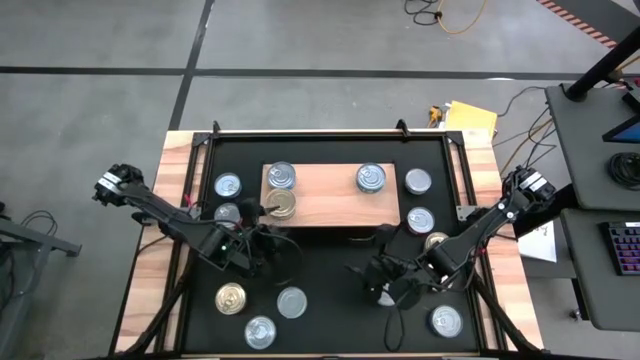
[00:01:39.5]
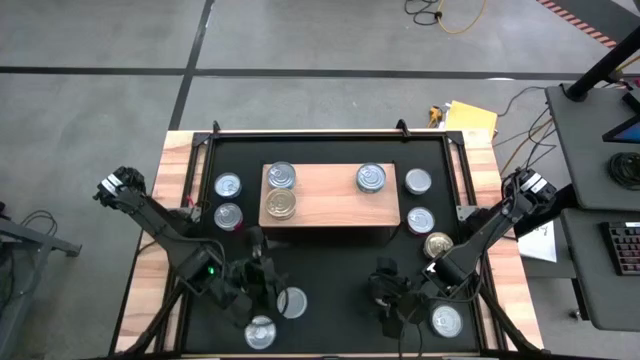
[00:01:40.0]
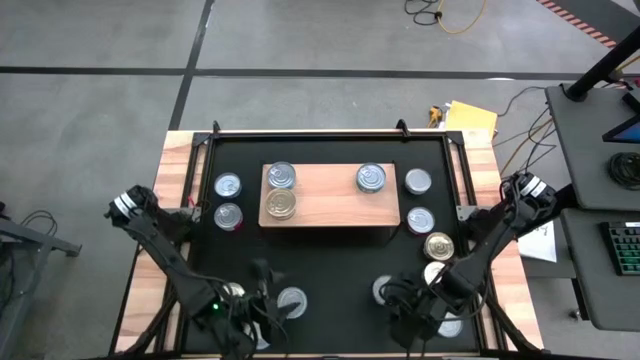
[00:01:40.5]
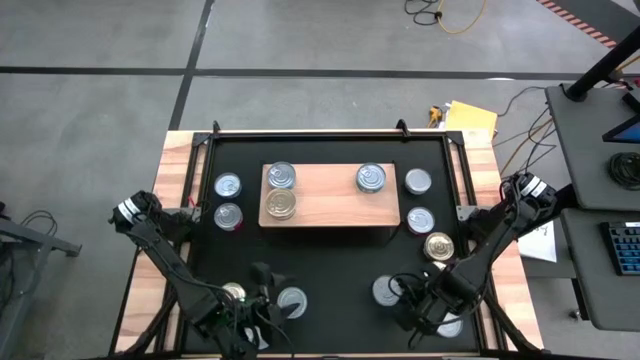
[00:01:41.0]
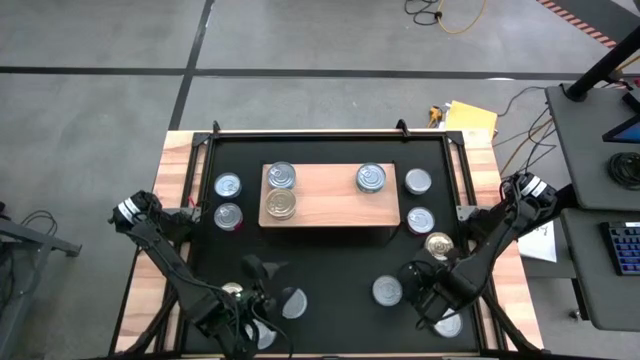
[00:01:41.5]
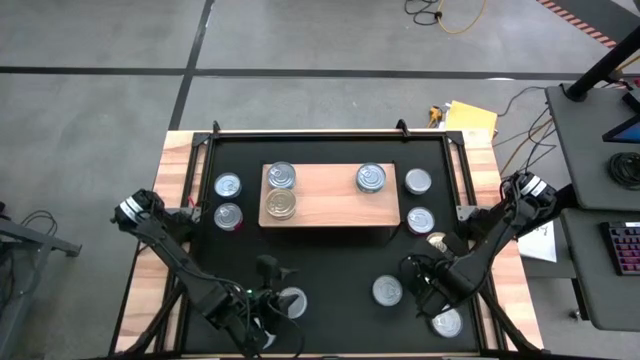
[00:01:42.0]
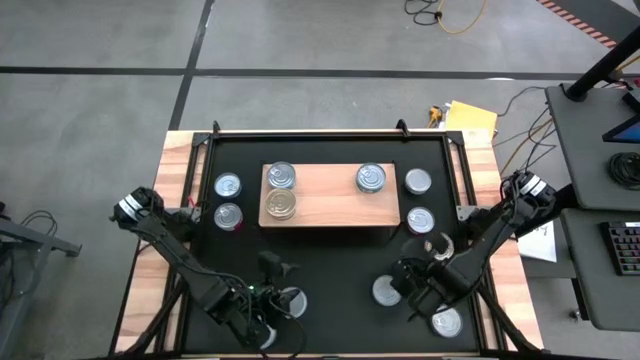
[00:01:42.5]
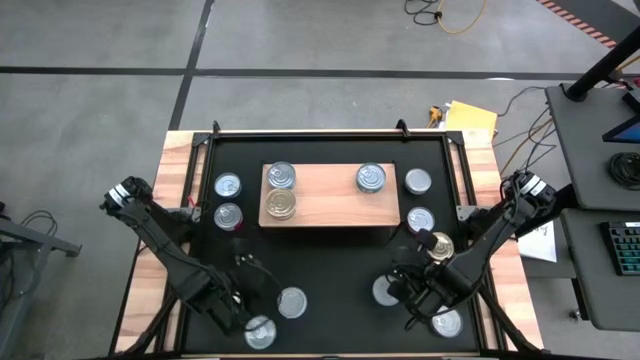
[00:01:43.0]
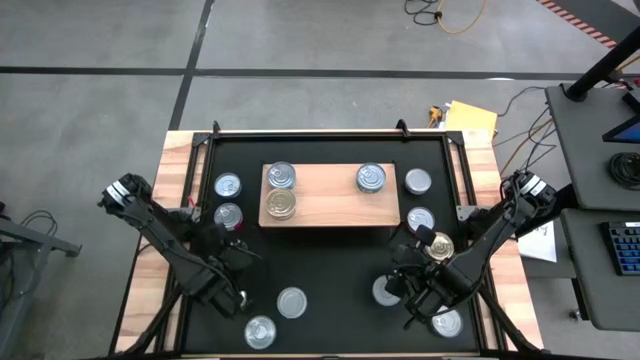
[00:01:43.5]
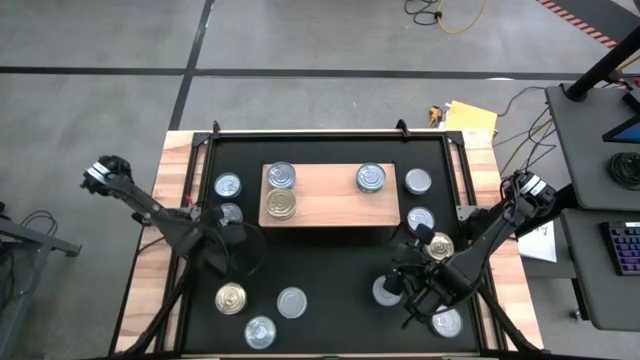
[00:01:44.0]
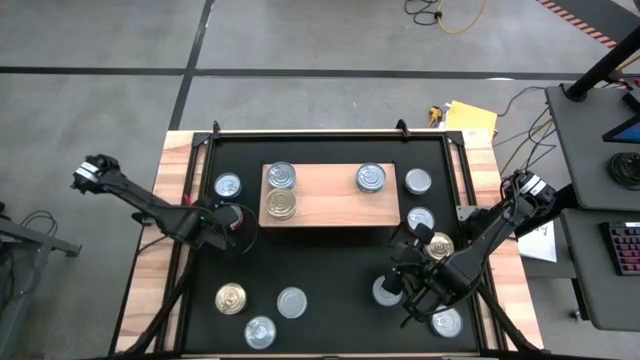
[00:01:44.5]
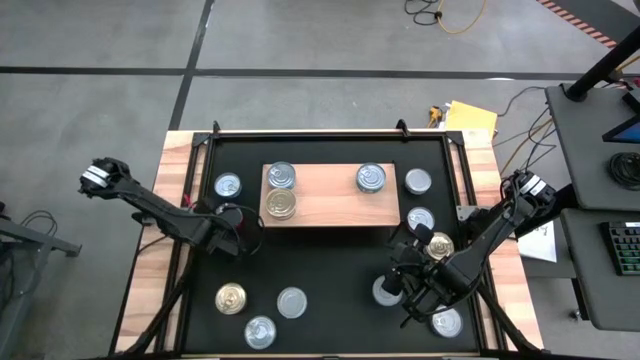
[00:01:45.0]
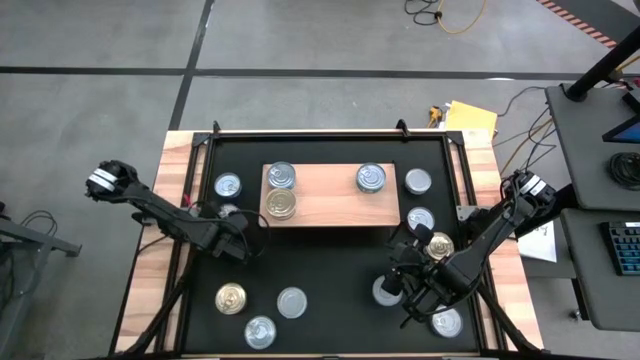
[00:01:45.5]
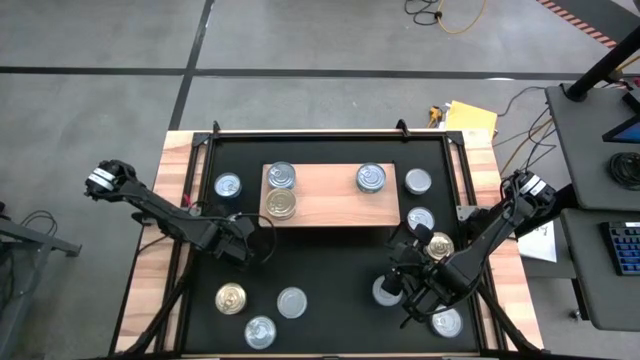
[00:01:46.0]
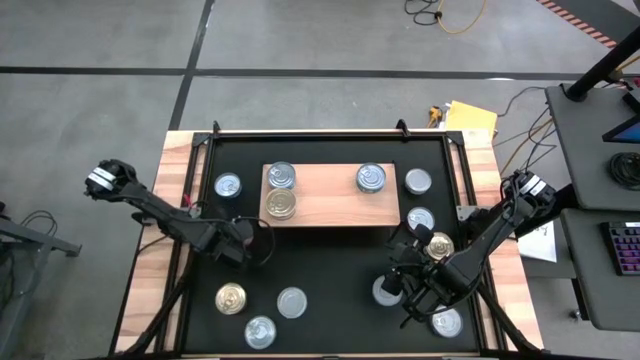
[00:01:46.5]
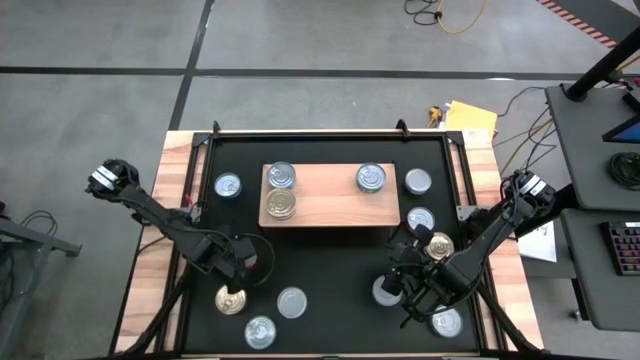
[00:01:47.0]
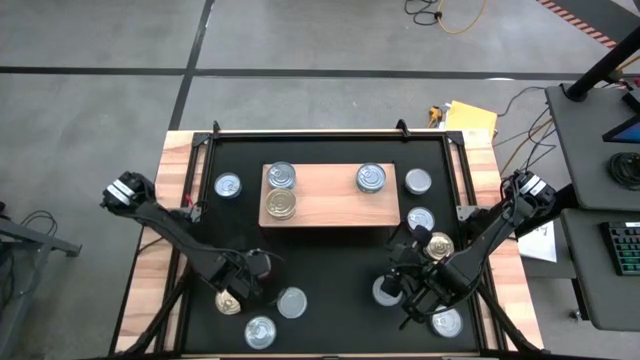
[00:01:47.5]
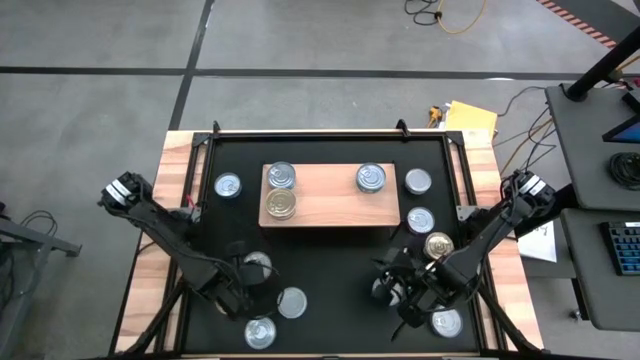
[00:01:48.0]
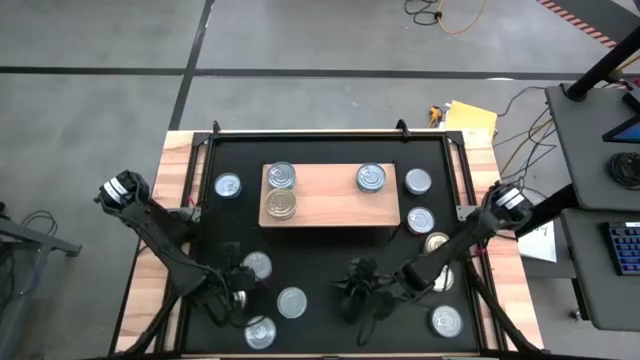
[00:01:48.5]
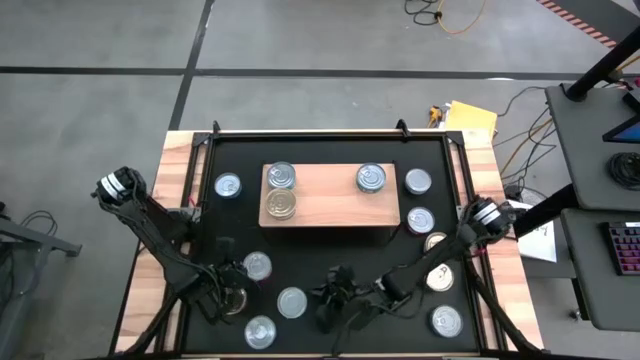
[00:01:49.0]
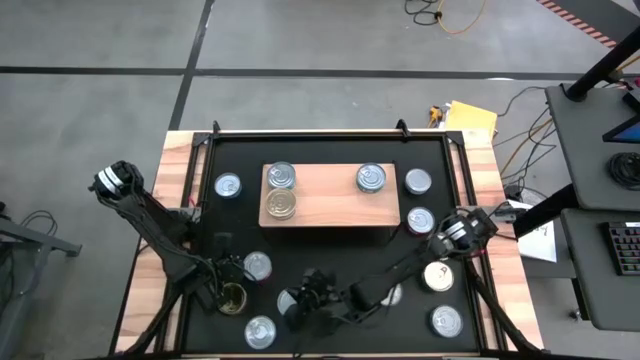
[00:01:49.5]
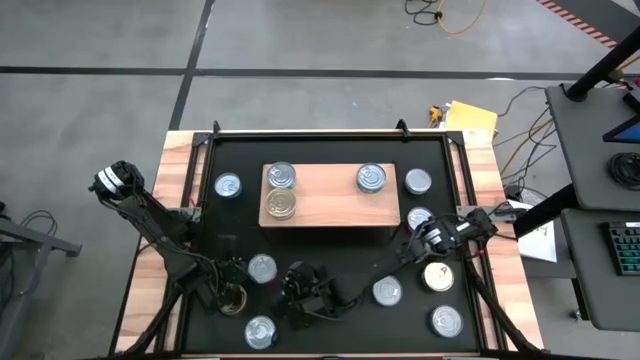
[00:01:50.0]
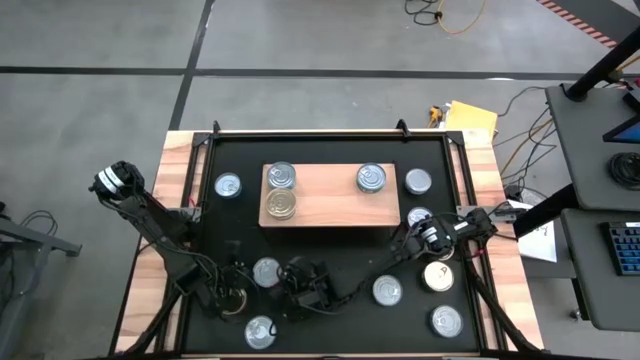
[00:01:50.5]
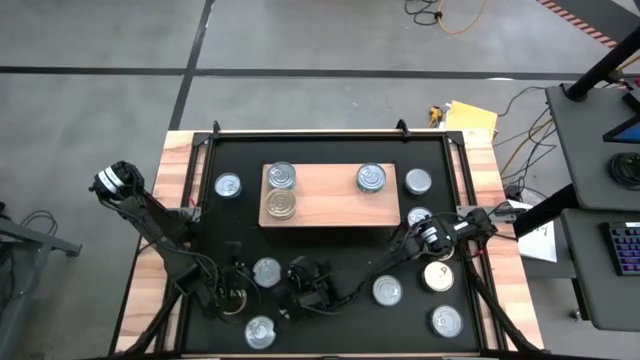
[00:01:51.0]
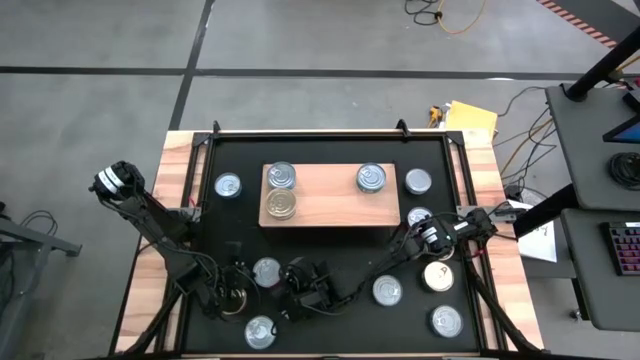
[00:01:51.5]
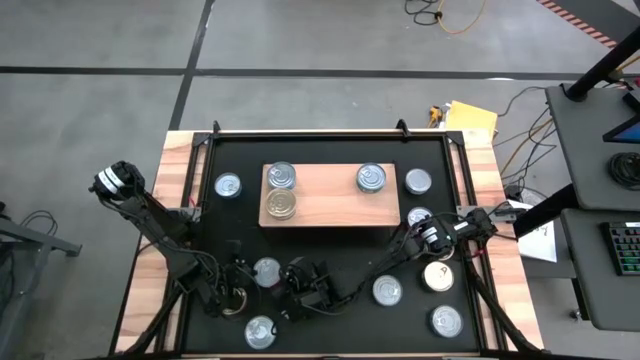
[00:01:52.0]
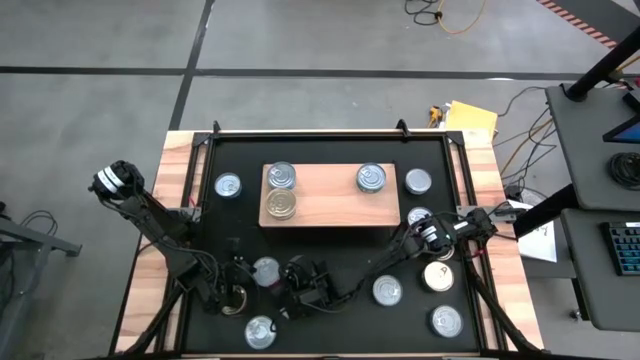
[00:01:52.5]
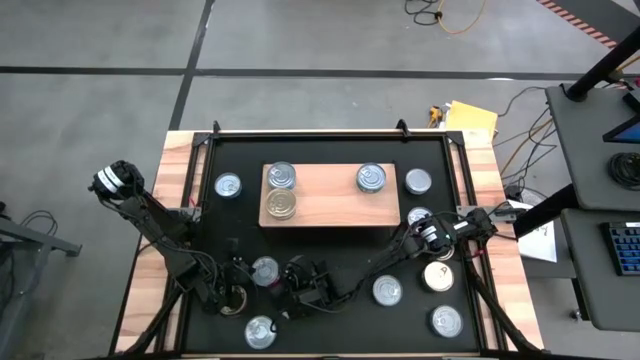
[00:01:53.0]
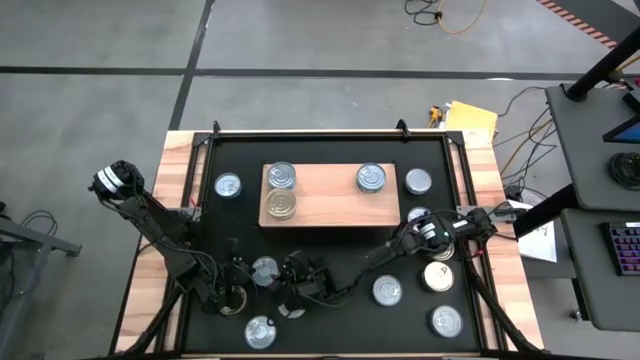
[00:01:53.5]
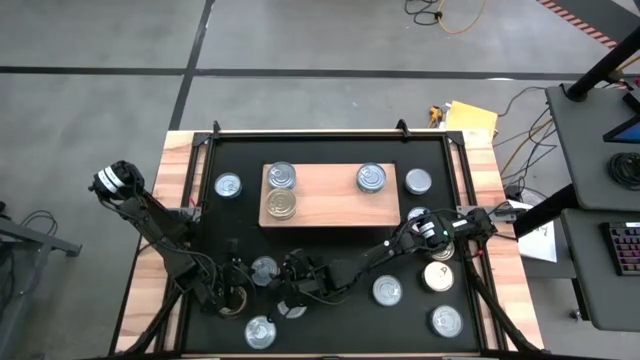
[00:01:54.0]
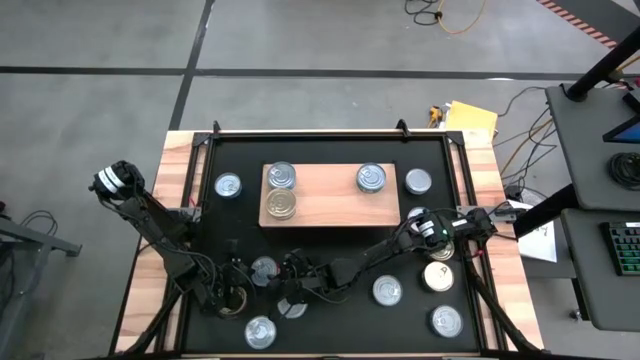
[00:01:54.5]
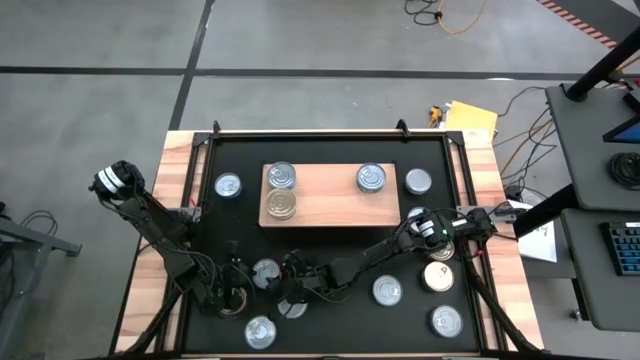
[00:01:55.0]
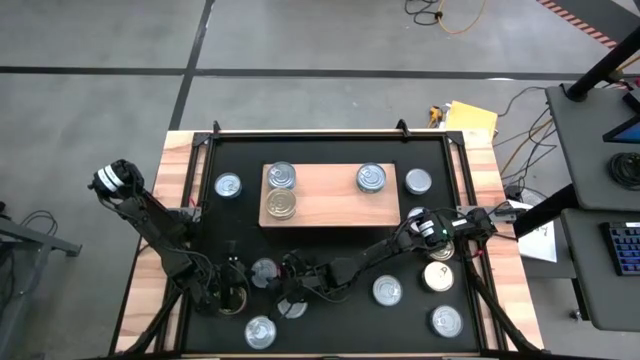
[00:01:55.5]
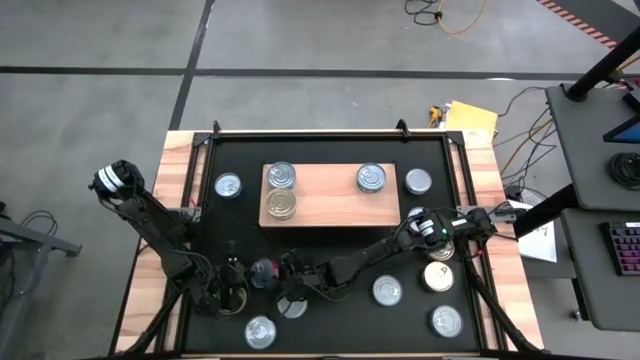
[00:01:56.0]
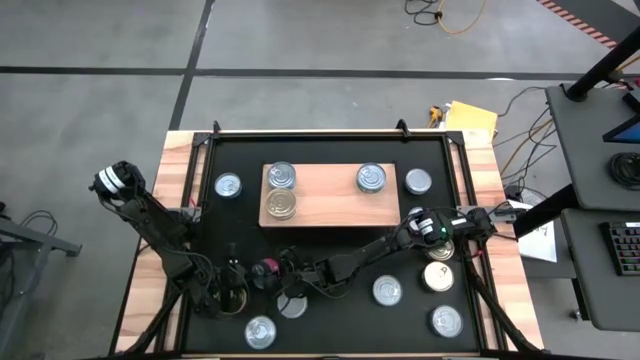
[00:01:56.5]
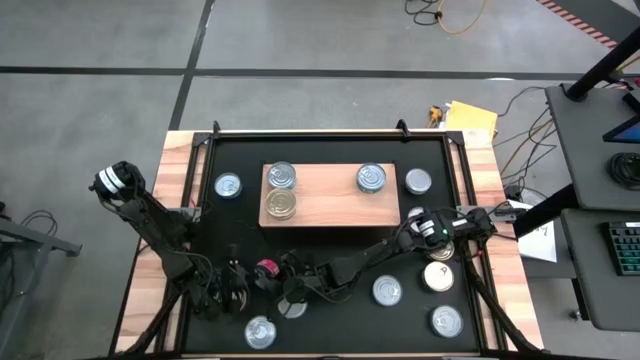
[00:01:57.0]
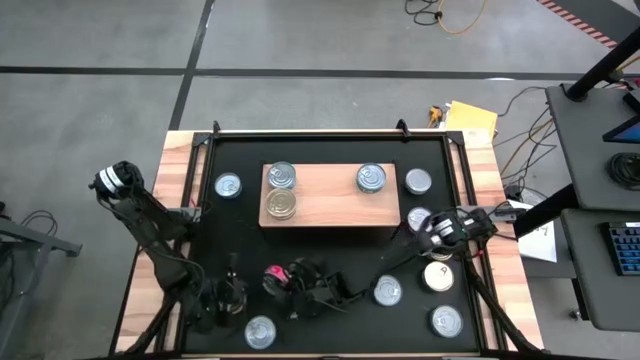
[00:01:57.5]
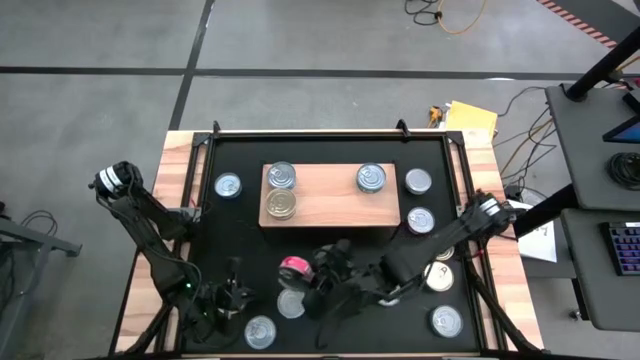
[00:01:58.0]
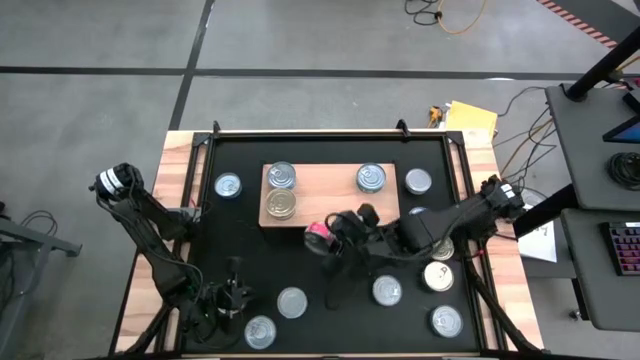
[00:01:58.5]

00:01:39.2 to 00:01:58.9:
Task: Stack canned seafood by type on shelf
Put the red tuna can on the shelf

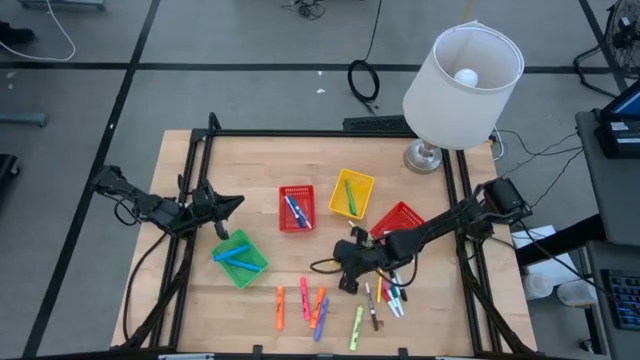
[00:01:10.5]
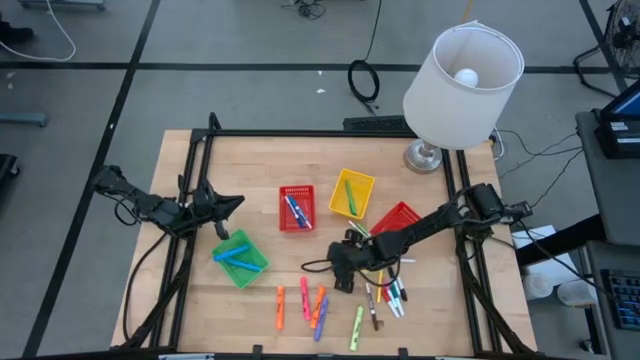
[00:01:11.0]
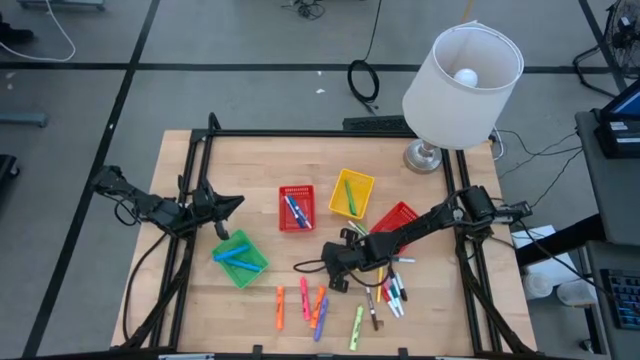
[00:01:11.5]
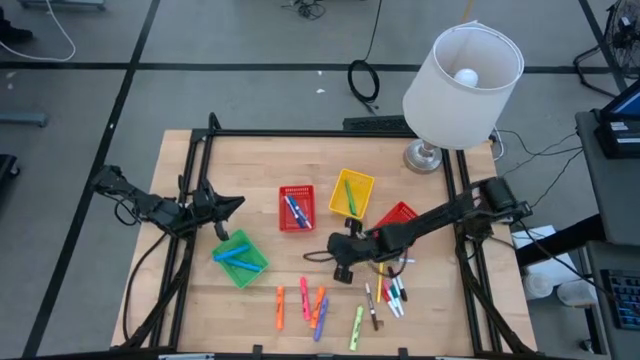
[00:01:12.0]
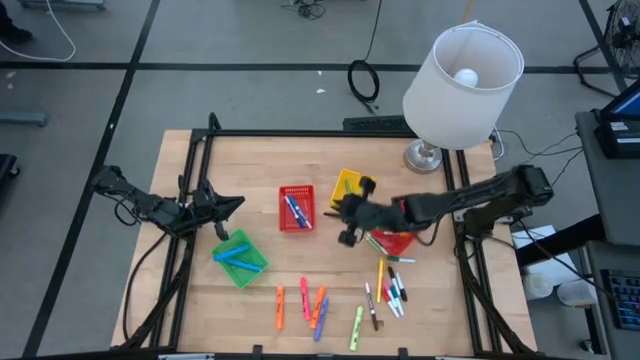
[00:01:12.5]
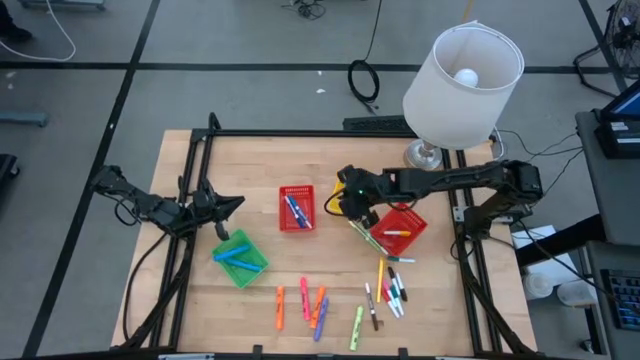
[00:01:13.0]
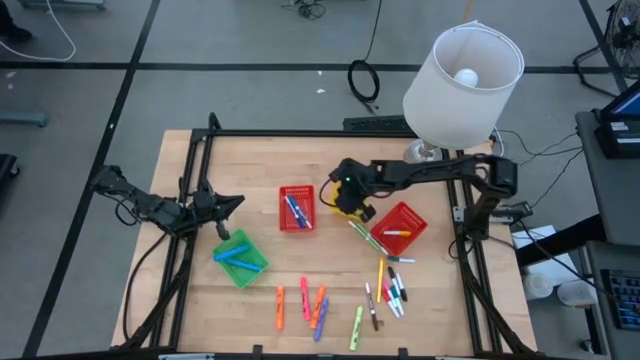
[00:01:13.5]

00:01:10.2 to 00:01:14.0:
Task: Pick & Place Markers
Put the yellow pen into the yellow bin
